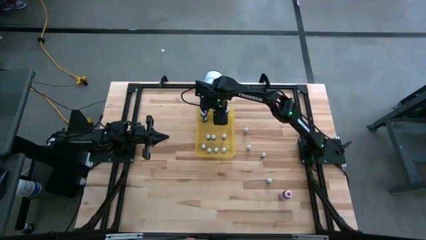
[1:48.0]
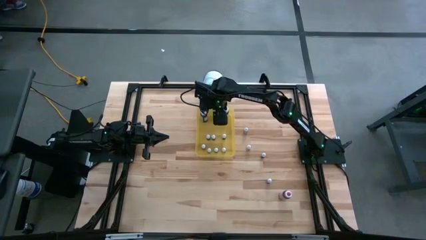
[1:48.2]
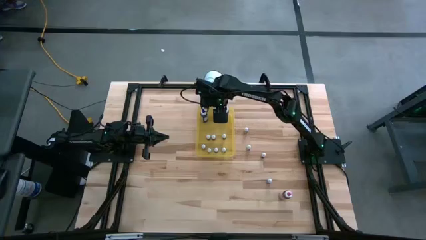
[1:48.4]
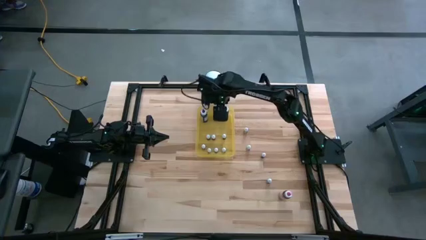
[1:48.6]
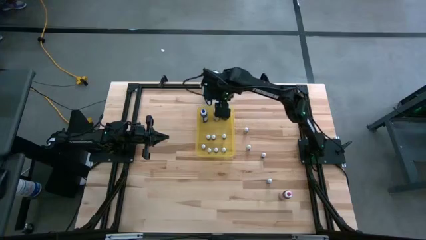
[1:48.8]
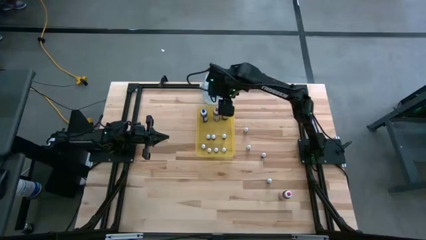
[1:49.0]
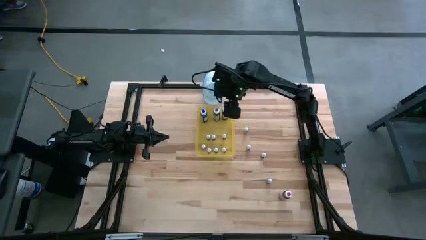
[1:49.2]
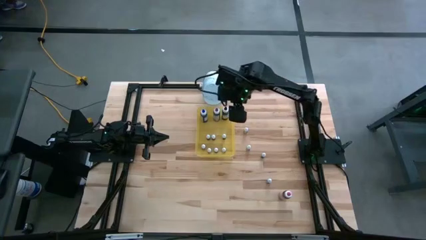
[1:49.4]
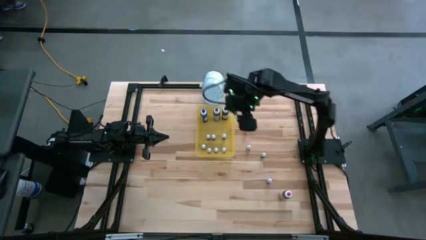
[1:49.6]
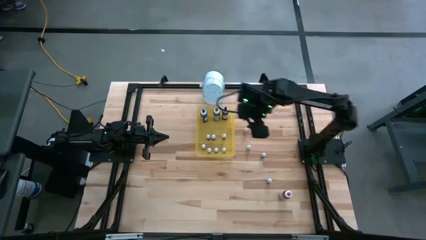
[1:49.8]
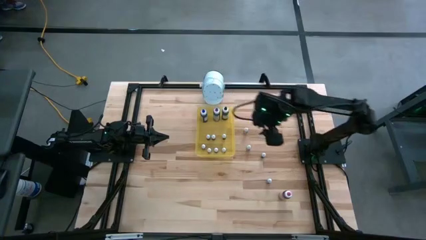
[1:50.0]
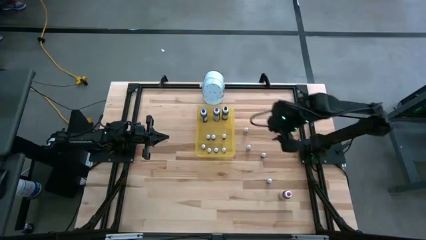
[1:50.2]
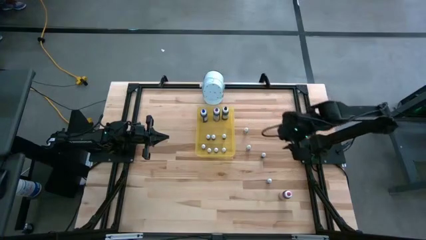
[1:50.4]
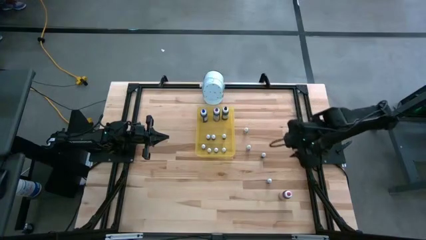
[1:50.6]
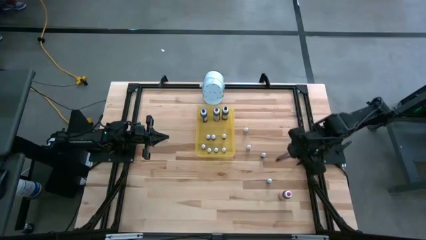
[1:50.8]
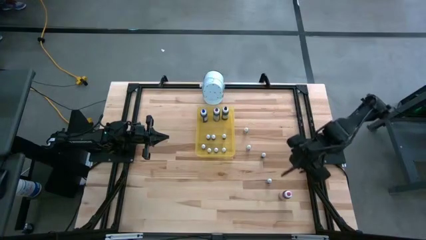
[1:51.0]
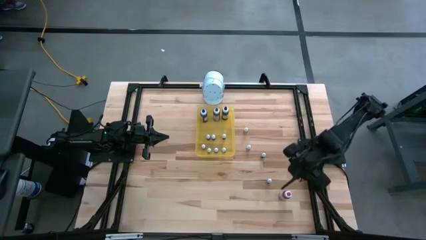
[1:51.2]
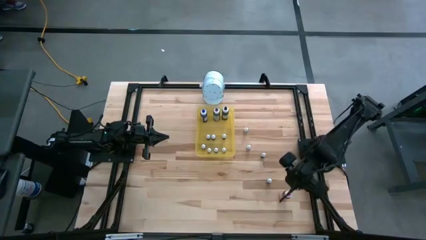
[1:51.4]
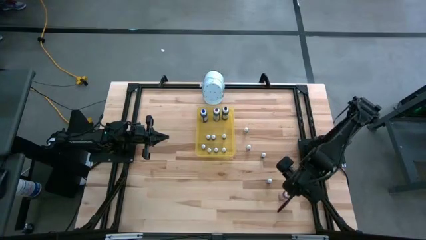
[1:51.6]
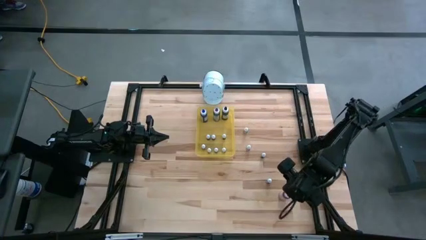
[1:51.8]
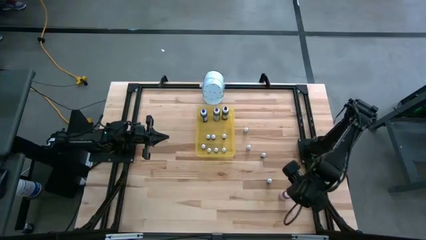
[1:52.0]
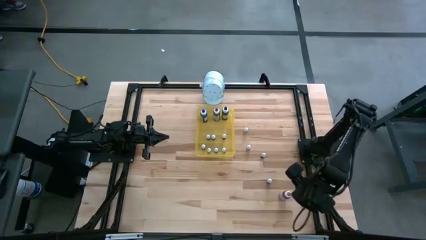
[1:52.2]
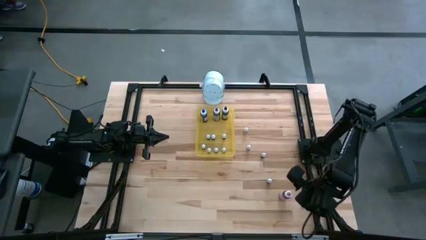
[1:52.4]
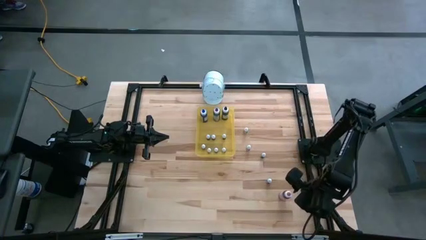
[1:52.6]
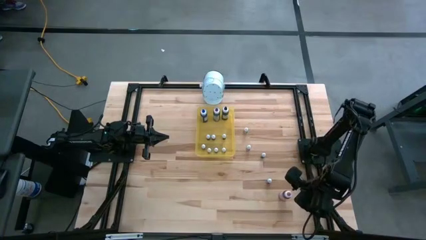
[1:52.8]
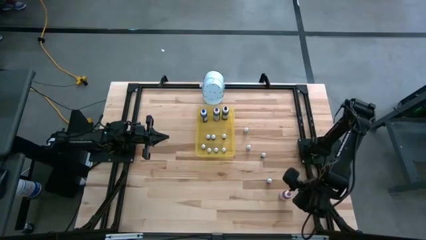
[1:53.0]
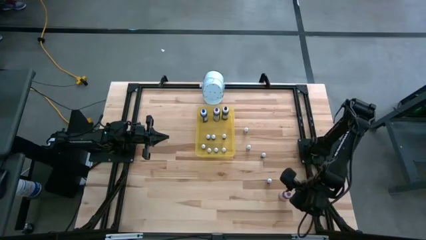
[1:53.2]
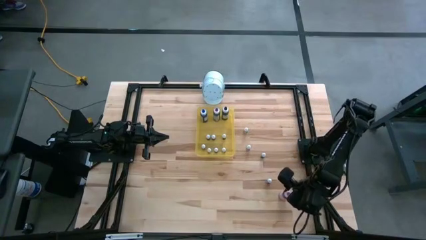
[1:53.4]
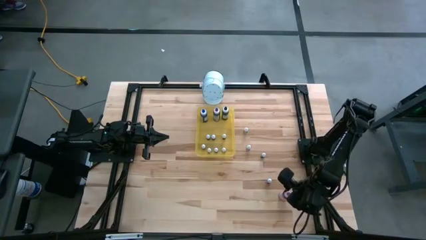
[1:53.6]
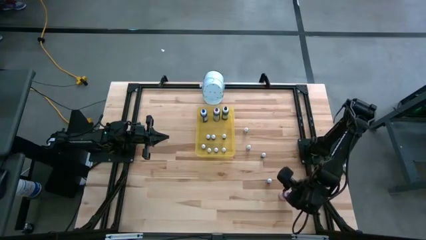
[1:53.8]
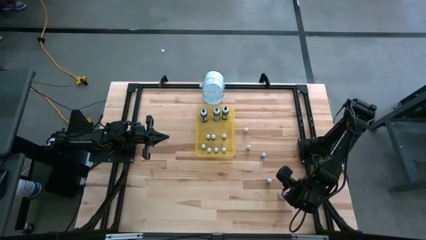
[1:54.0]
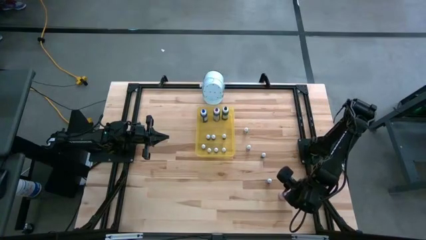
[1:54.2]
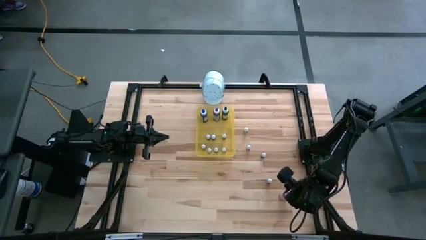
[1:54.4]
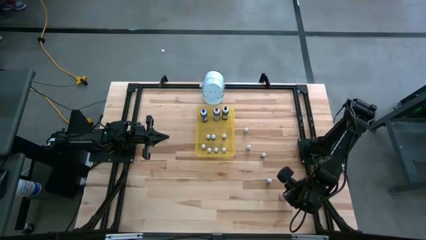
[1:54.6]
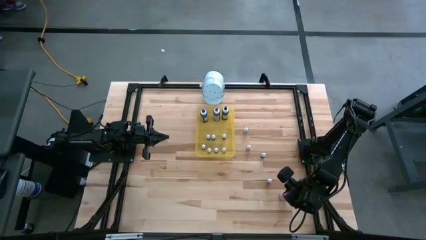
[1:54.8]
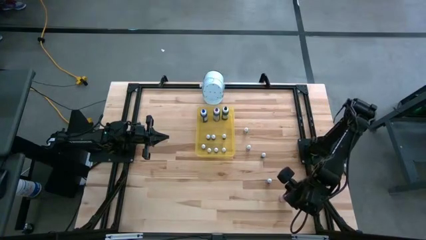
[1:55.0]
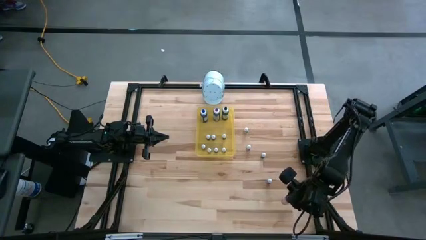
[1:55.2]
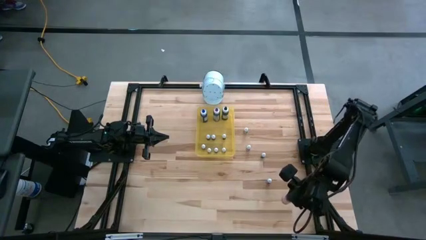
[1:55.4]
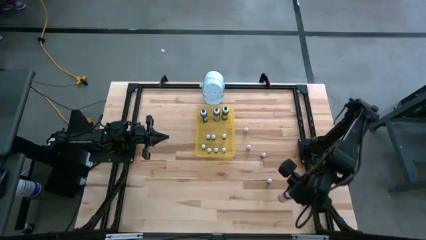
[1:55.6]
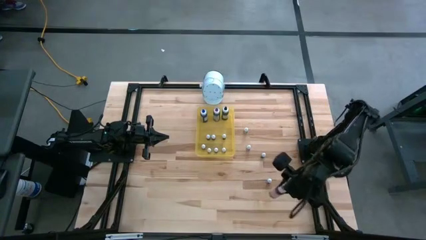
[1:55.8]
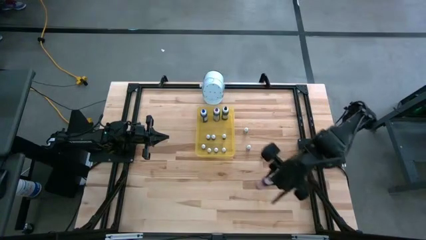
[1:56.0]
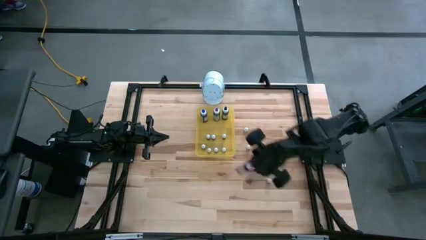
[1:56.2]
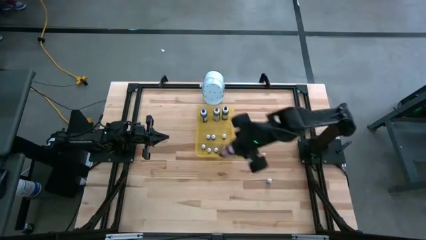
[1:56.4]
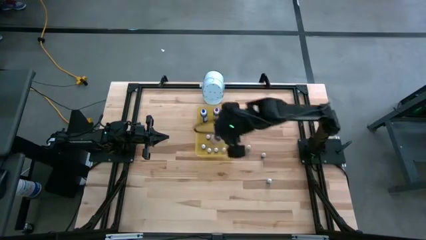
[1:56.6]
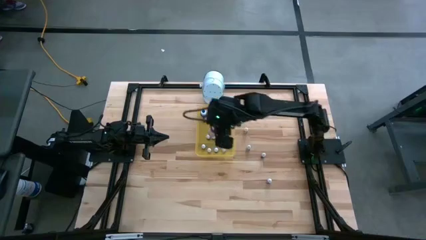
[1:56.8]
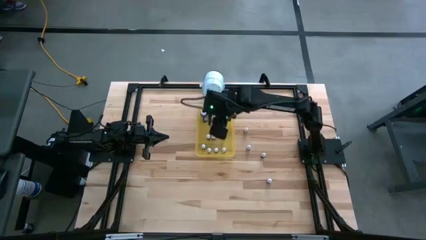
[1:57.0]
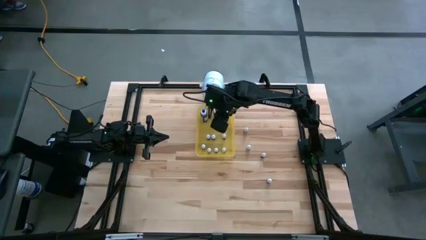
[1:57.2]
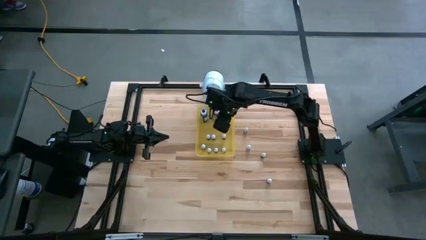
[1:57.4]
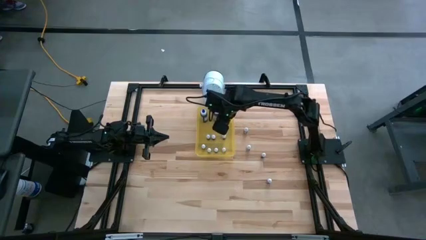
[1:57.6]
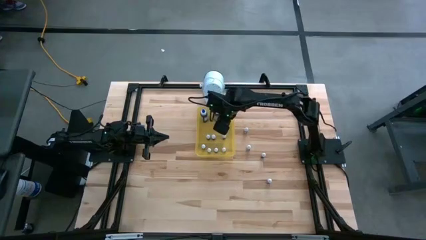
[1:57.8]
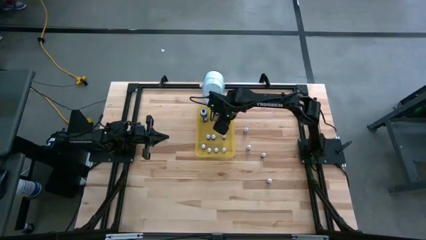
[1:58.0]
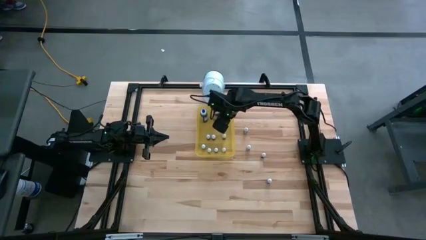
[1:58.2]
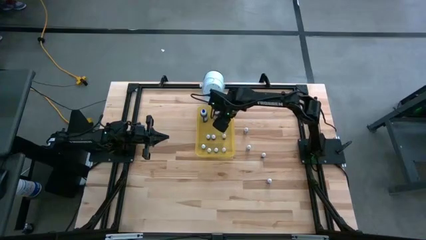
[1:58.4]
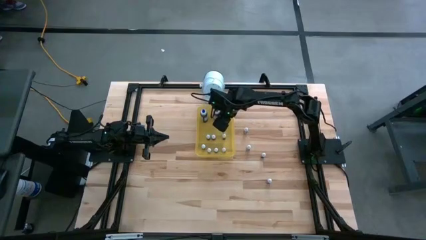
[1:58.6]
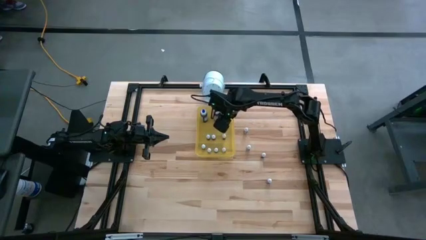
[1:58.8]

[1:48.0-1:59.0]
Task: Pick & Place food coloring
Put the big pink food coloring bottle in the yellow transparent bin
